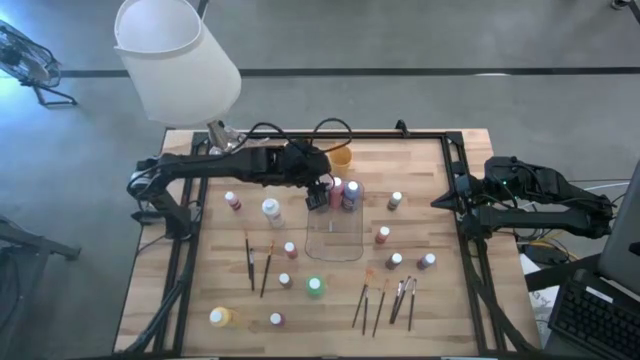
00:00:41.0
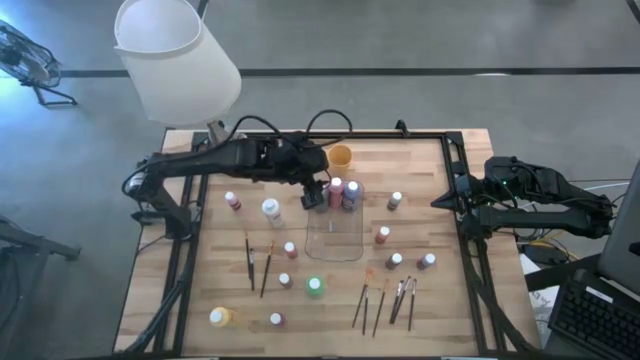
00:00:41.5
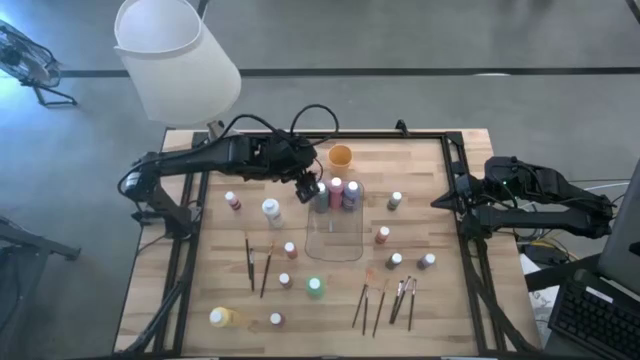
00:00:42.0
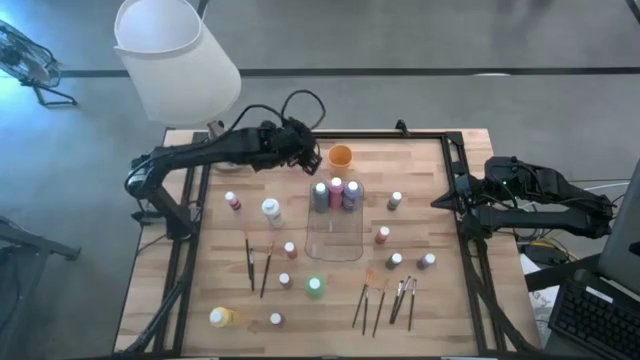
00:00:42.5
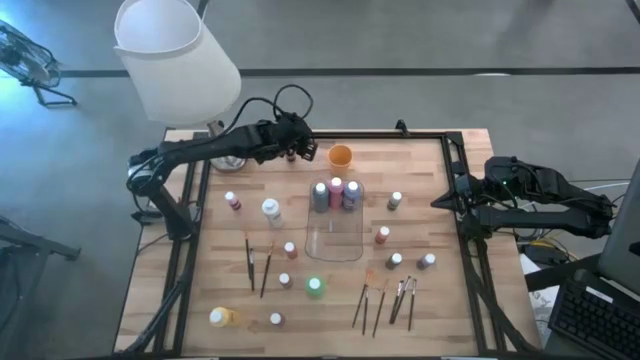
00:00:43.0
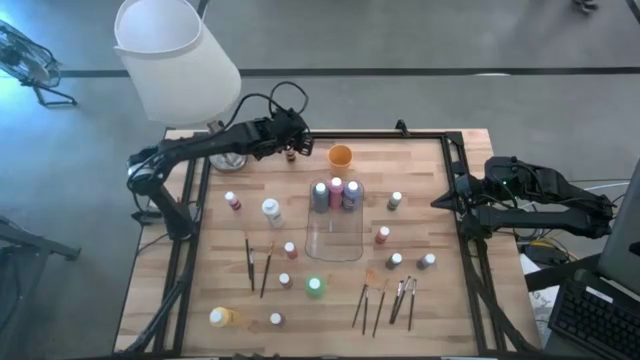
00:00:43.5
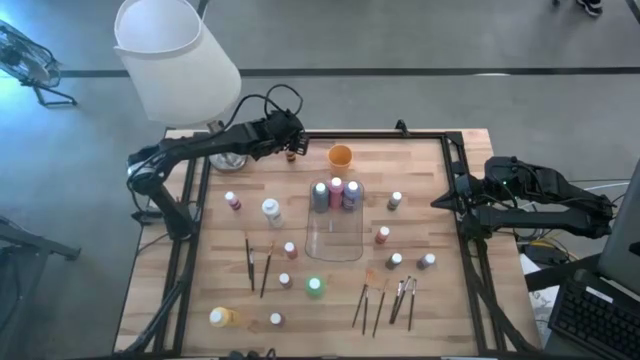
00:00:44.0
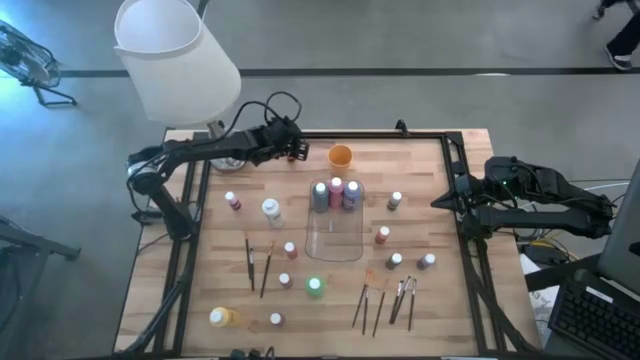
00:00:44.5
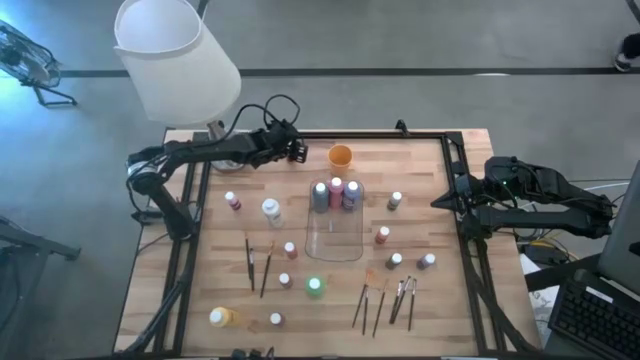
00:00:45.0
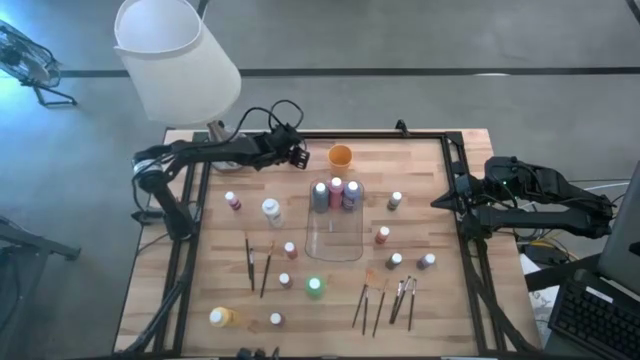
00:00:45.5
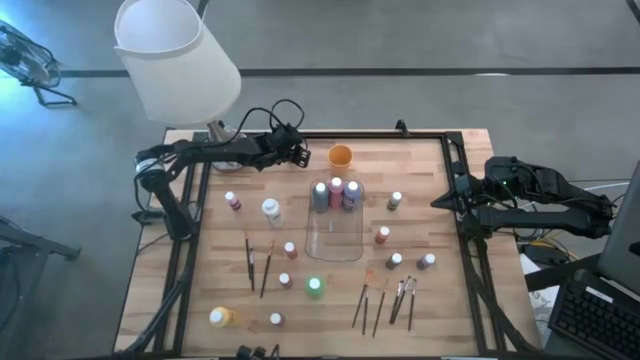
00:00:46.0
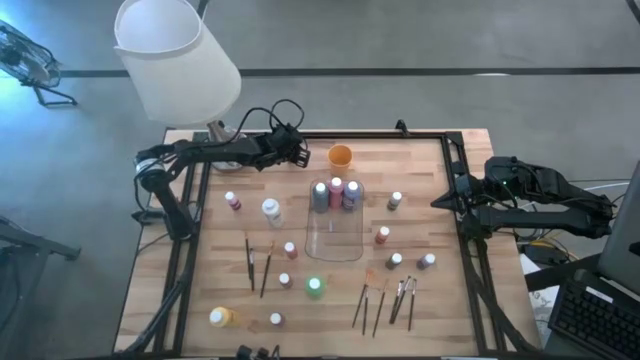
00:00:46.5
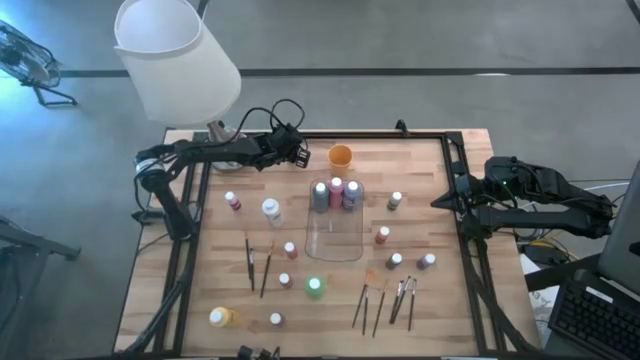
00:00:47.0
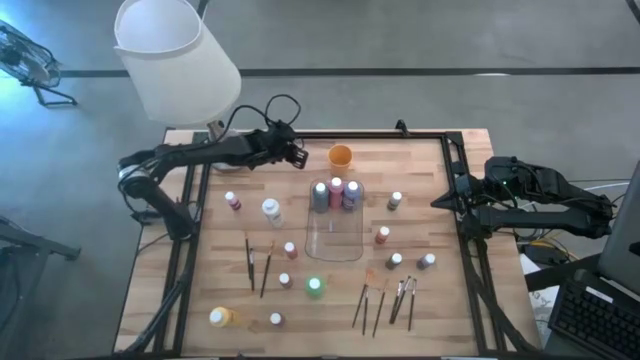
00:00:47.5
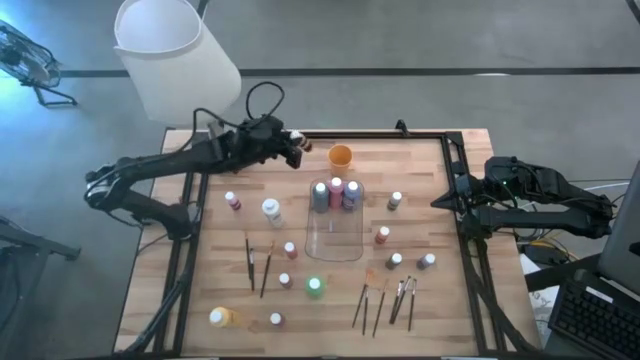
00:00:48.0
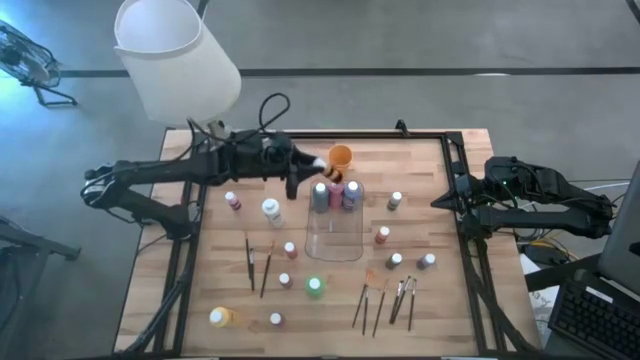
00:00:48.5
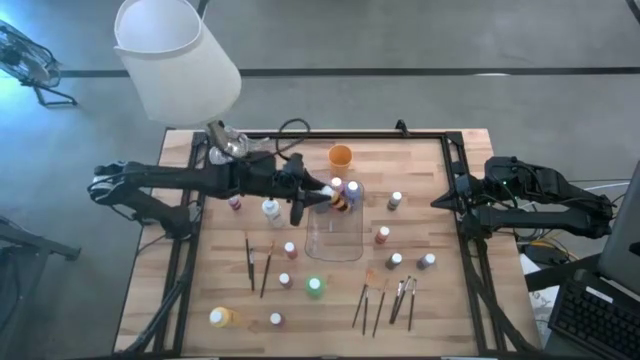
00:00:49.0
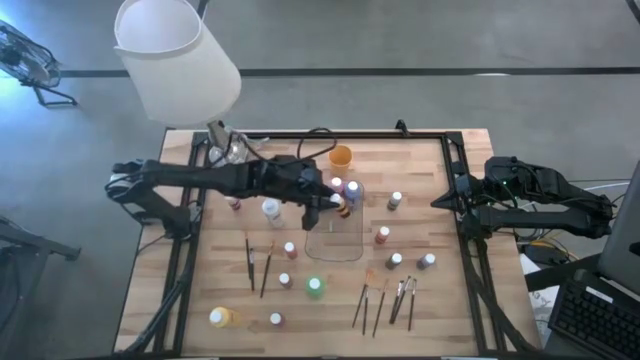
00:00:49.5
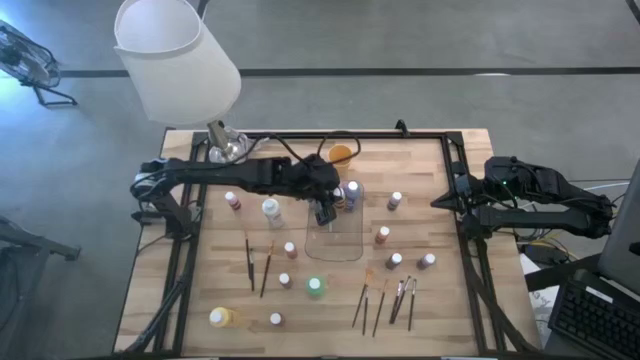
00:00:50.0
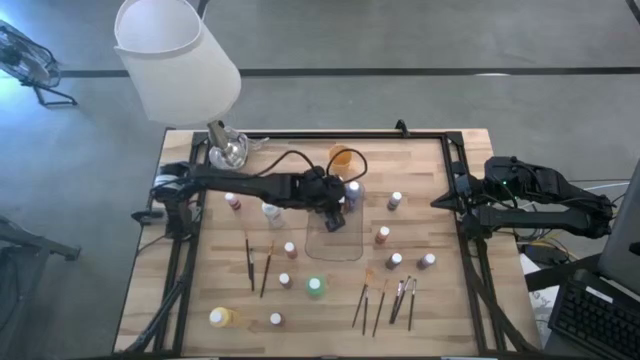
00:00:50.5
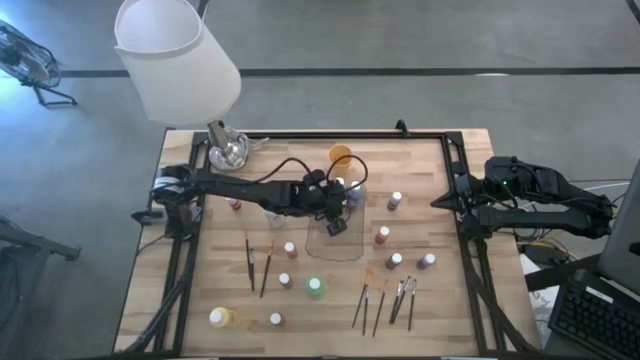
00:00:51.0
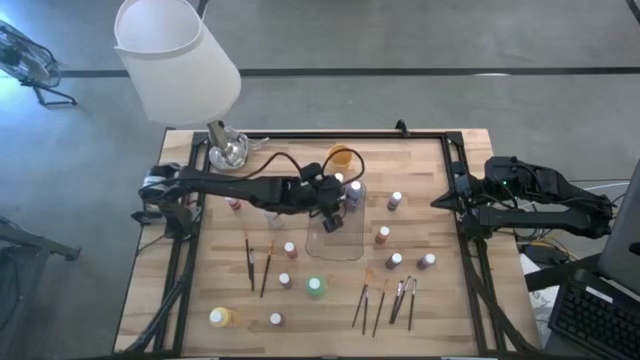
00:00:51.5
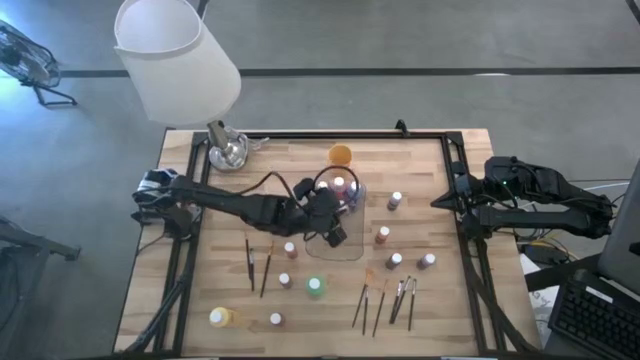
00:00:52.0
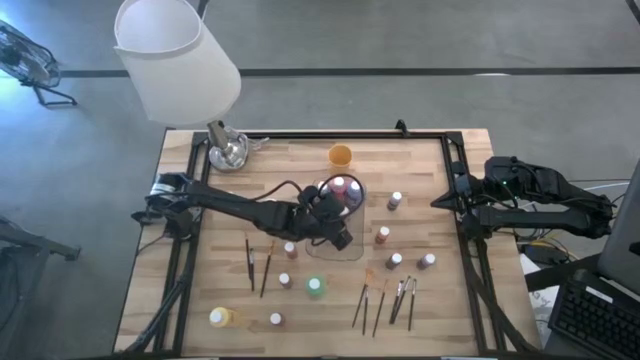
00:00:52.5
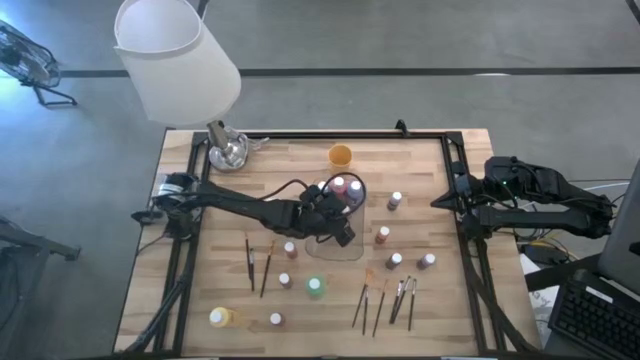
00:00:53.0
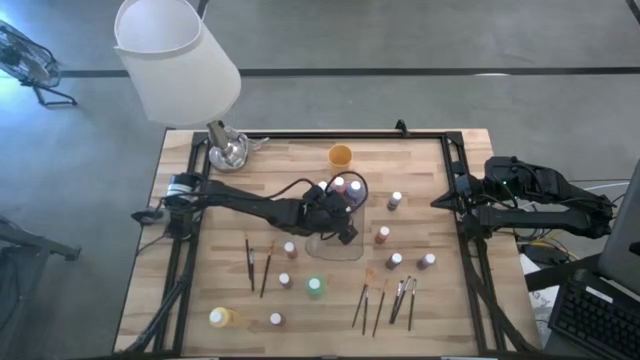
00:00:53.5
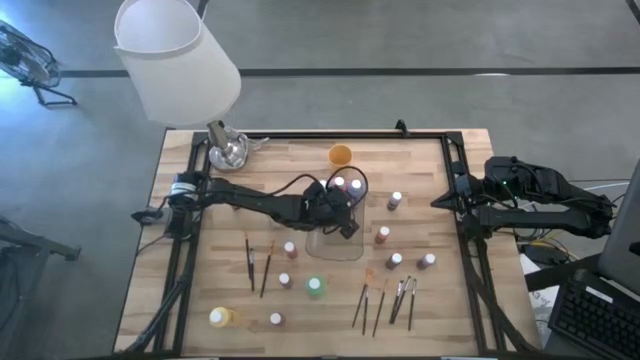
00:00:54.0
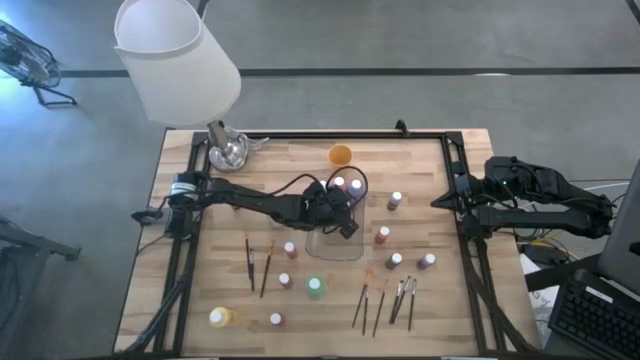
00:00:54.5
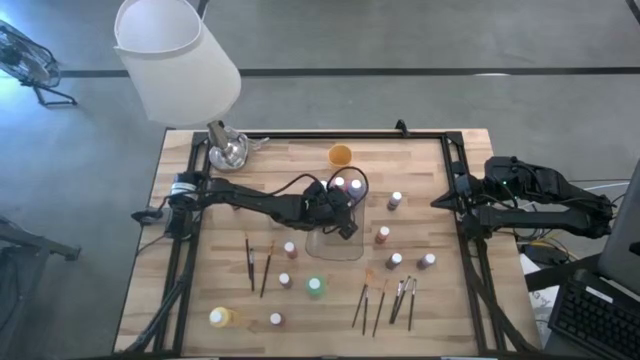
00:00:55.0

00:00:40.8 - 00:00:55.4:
Task: Pick & Place Paint Supplies
Put the yellow paint bottle into the transparent bin

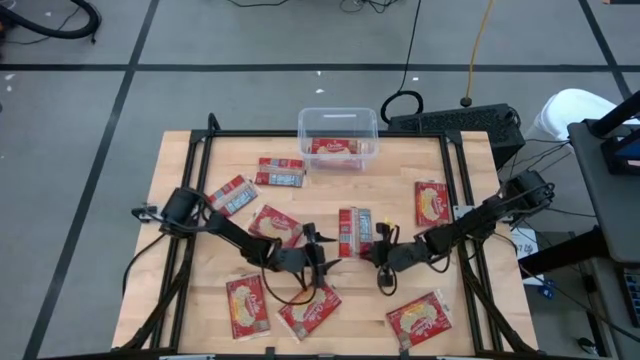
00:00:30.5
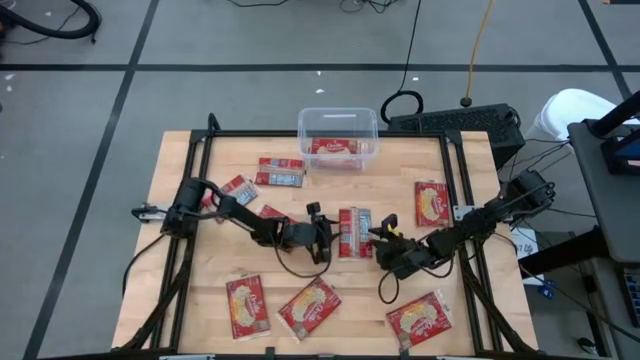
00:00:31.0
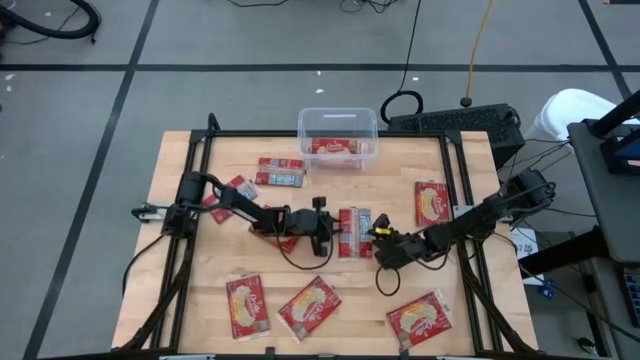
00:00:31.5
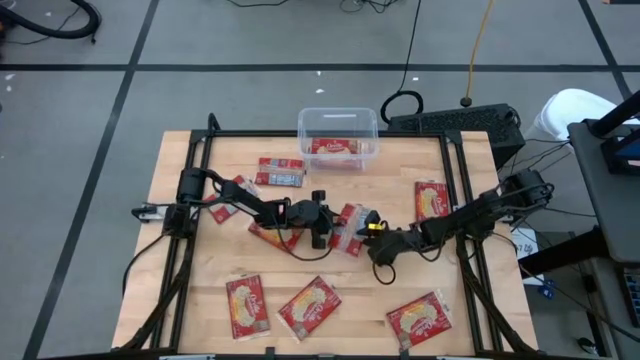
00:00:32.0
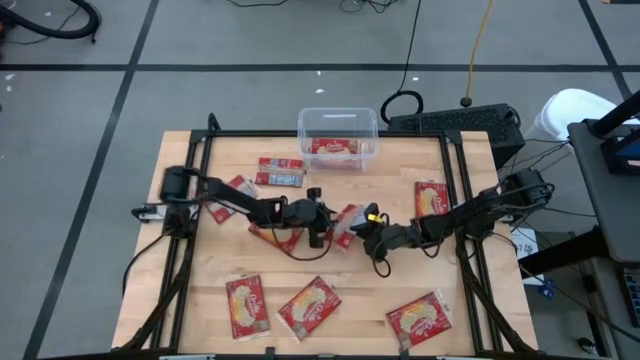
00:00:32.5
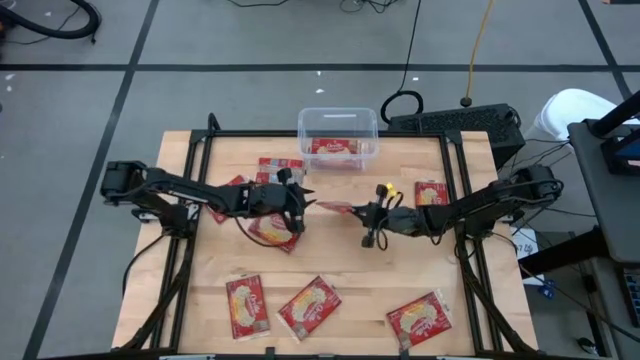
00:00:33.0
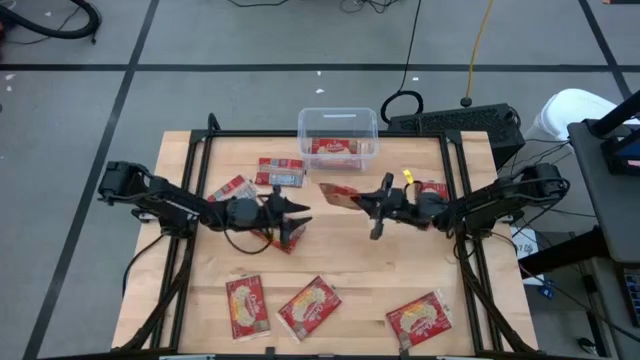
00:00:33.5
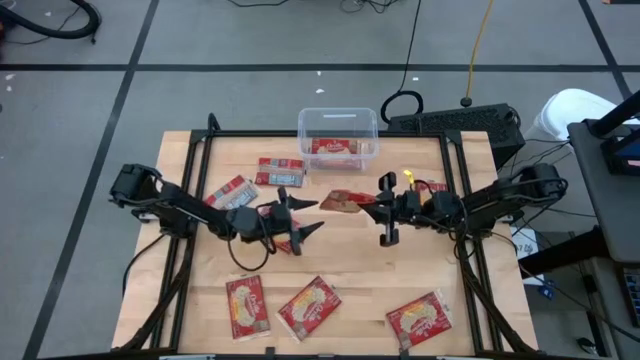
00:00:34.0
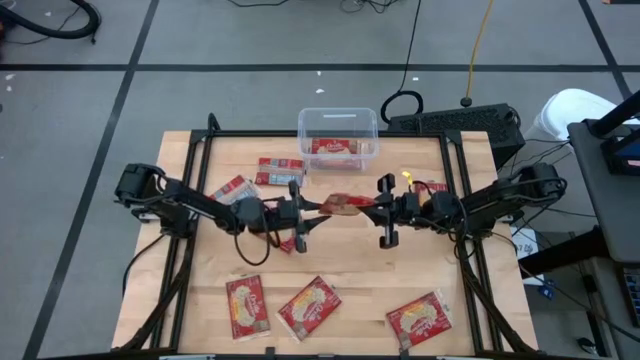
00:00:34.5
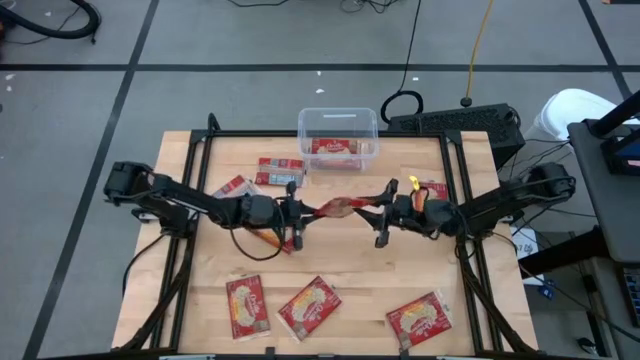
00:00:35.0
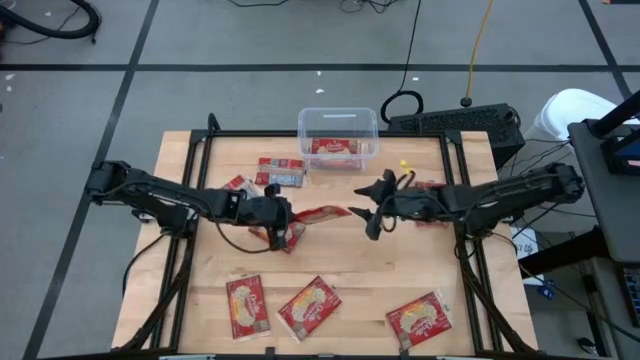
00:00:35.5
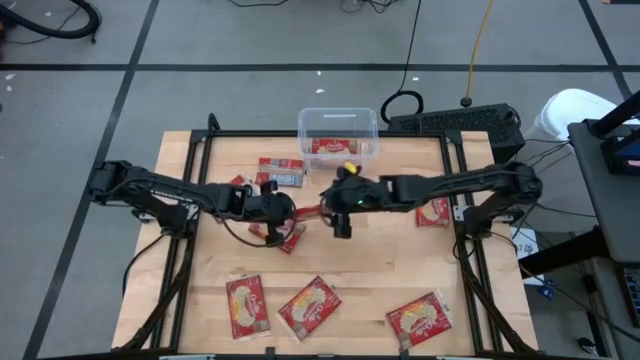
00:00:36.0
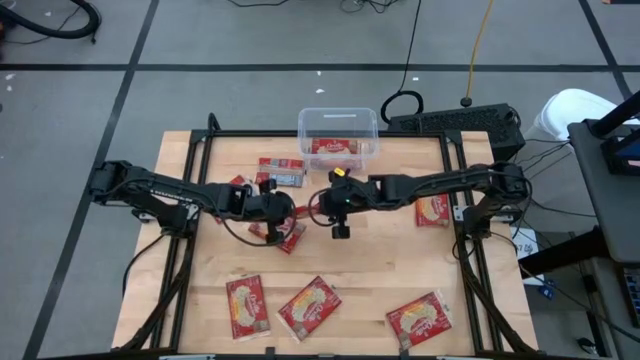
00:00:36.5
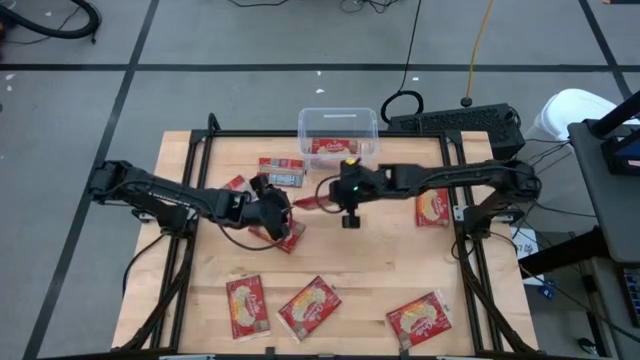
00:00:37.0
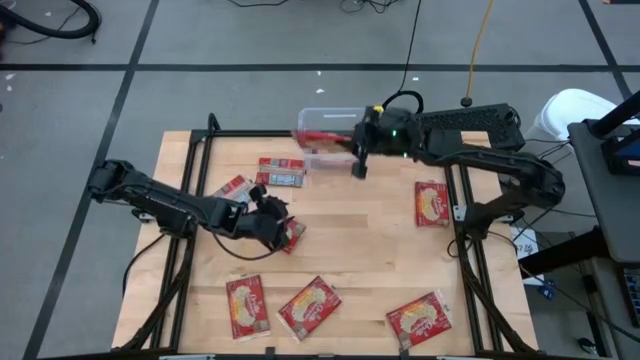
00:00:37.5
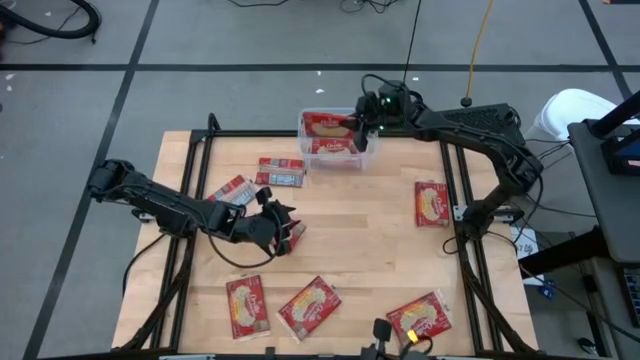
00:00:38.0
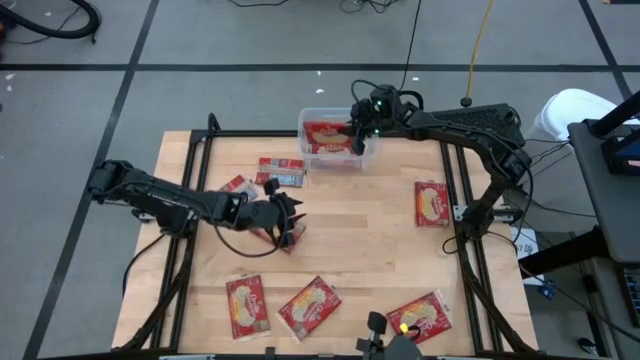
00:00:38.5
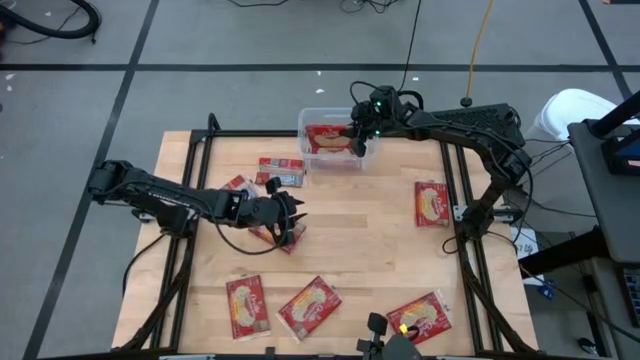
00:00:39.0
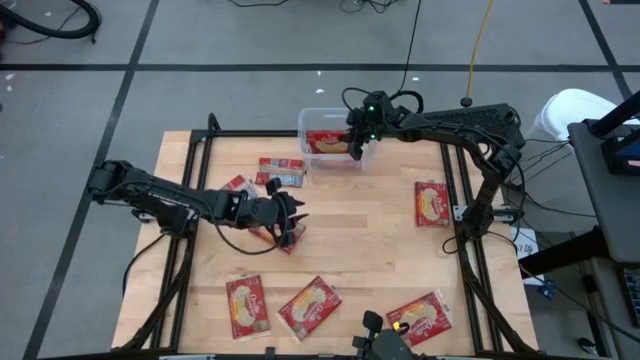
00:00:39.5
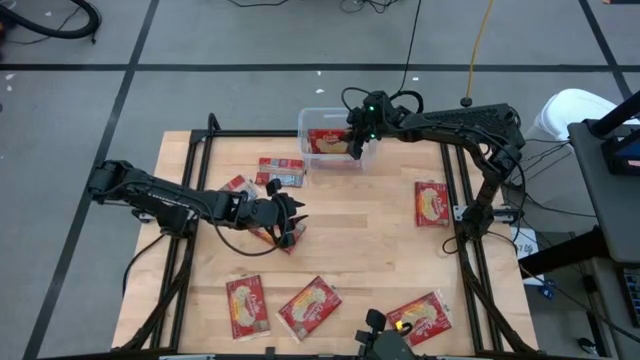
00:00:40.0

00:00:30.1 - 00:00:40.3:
Task: Sort popcorn bags into baskets
Put the popcorn bags into the transparent bin
